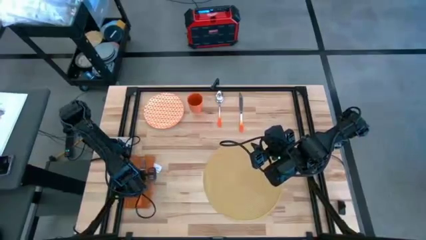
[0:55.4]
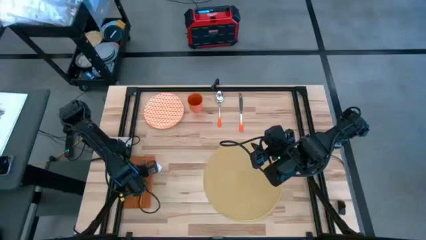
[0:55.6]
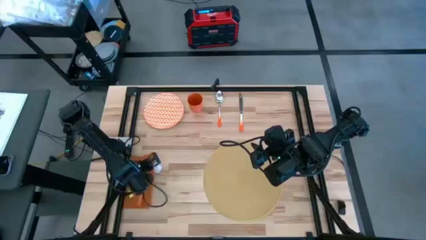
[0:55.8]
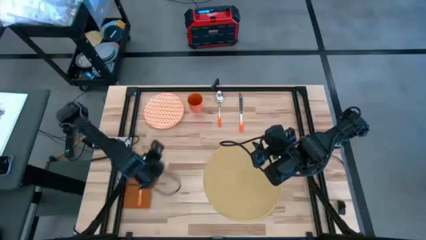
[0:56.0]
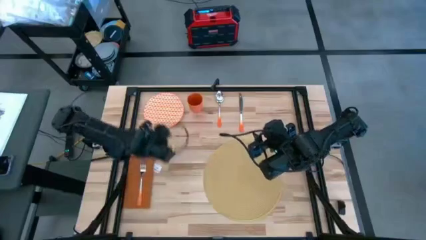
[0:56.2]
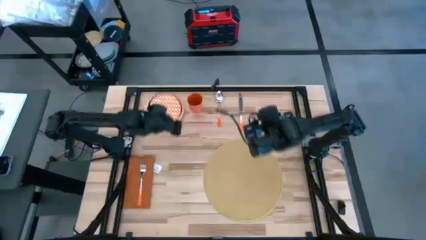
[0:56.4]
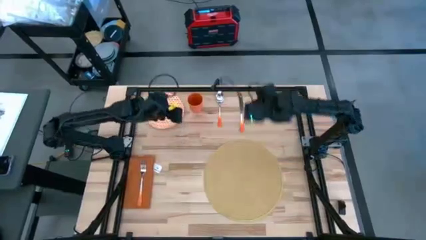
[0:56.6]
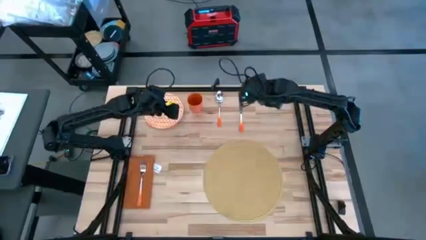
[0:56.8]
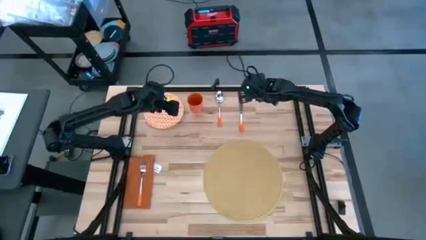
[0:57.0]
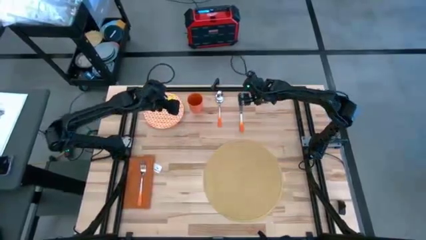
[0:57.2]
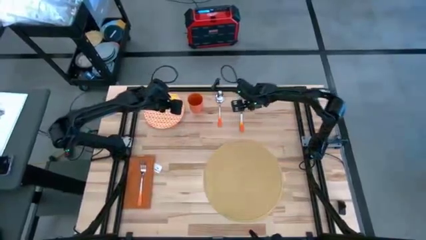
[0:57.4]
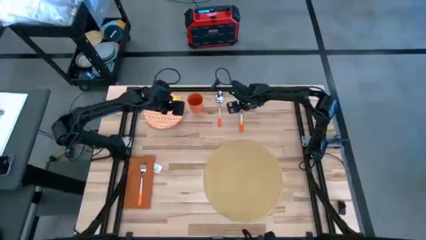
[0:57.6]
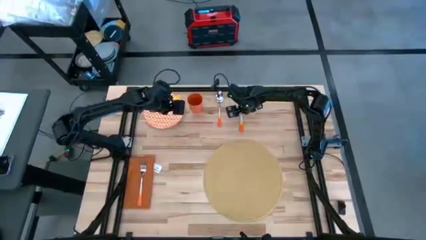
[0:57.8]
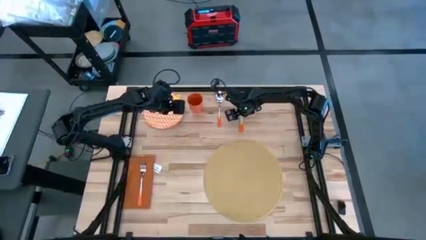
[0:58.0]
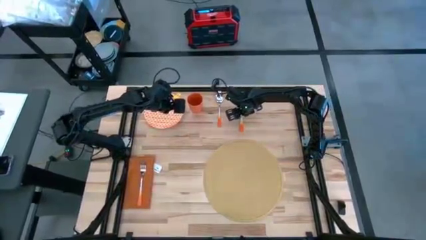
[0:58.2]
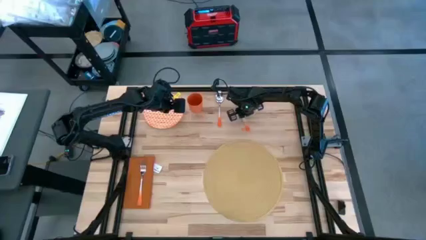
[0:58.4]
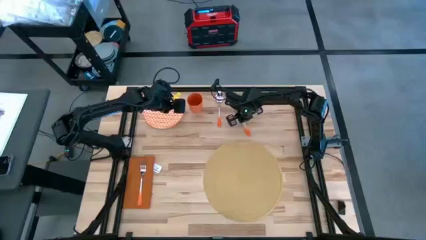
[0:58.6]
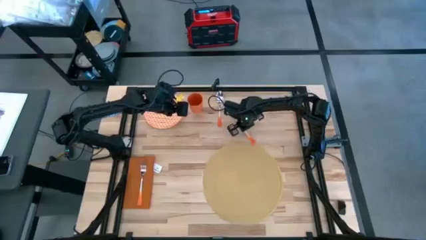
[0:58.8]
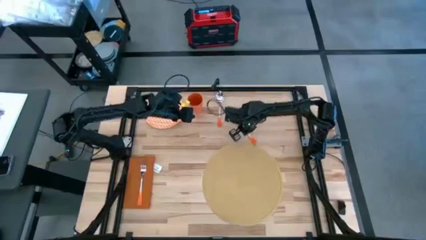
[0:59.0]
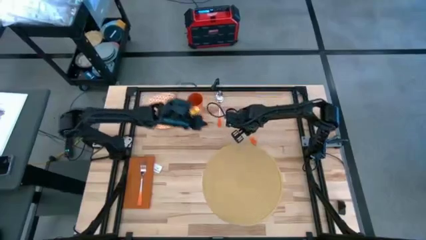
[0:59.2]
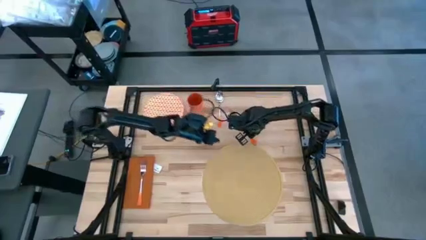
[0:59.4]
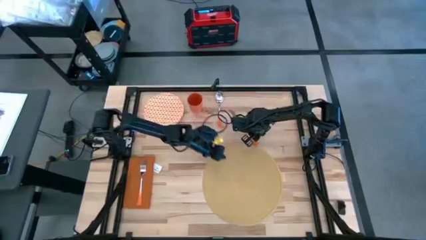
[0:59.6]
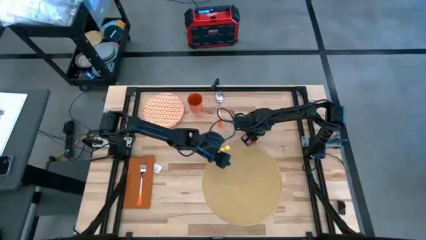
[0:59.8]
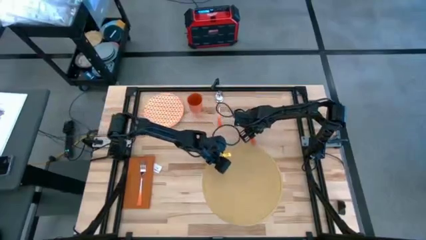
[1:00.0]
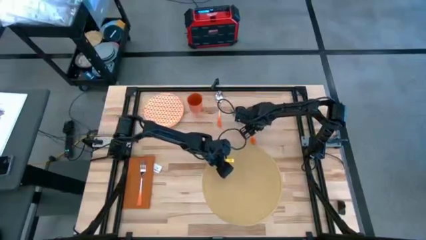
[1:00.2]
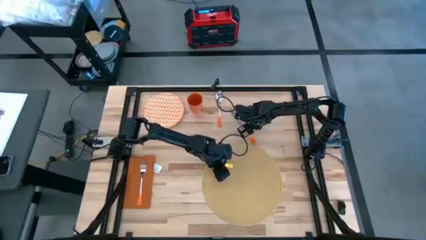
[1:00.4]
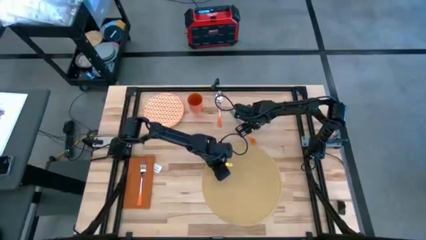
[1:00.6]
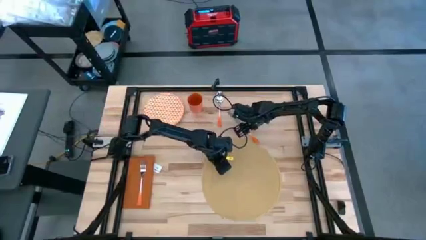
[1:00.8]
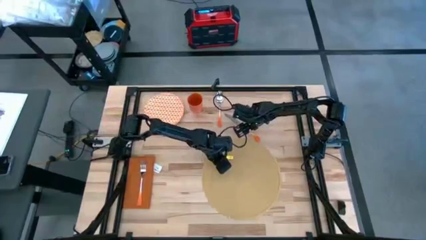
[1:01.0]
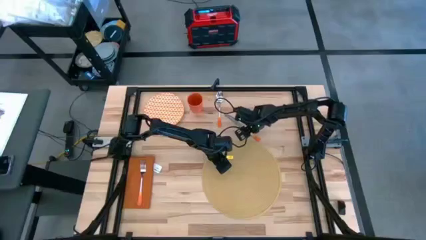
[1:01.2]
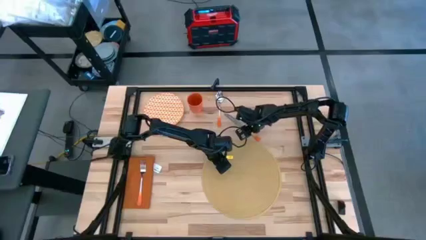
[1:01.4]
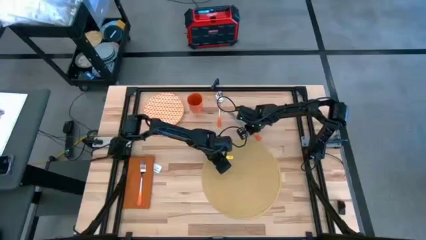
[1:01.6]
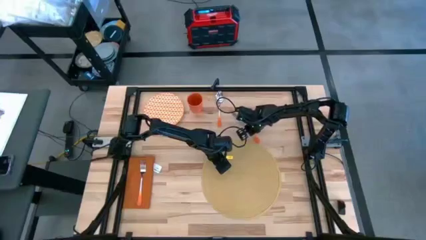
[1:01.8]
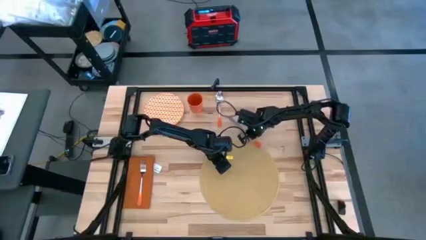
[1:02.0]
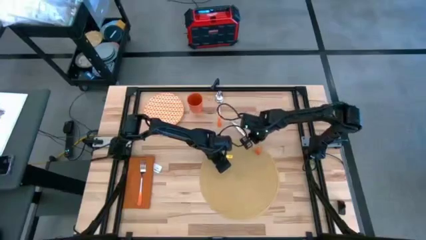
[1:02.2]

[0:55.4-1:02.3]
Task: Set table place
Put the orange table knife to the brown placemat

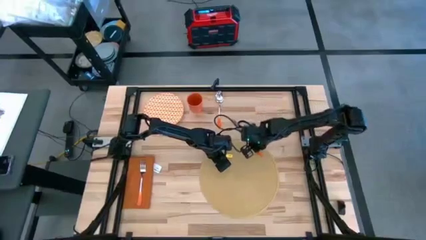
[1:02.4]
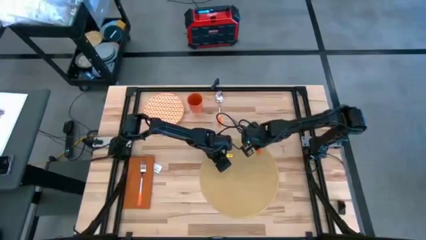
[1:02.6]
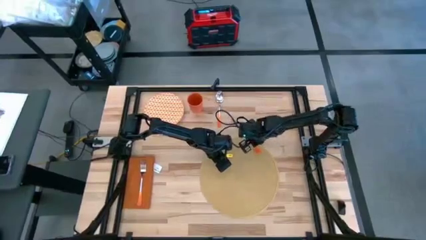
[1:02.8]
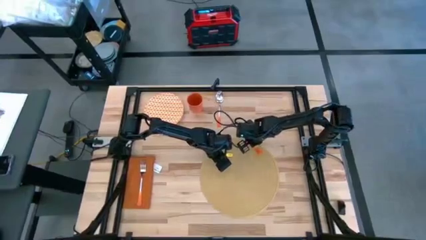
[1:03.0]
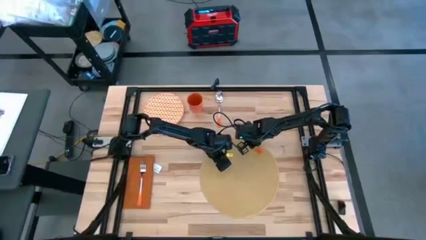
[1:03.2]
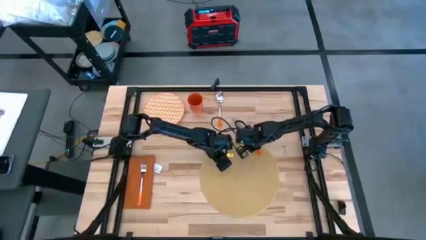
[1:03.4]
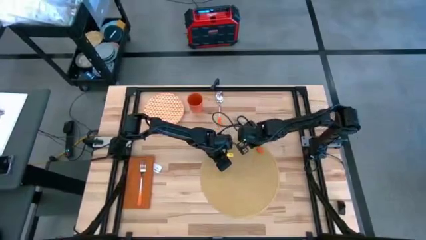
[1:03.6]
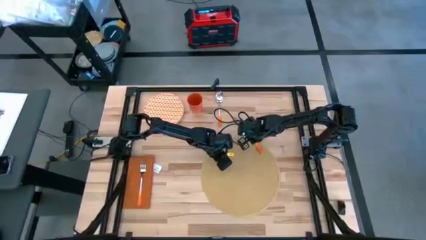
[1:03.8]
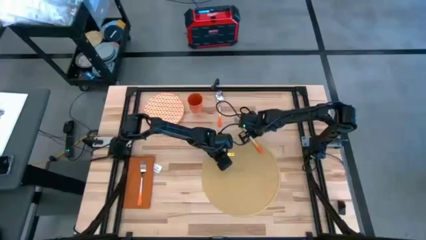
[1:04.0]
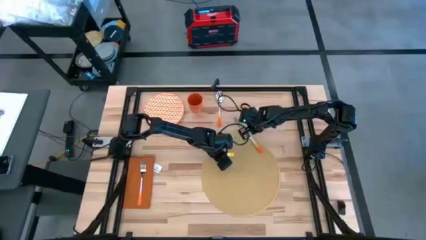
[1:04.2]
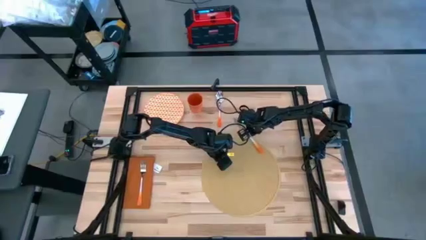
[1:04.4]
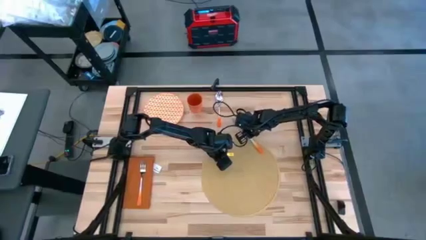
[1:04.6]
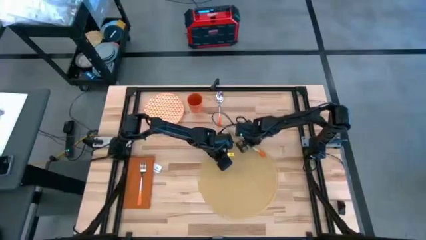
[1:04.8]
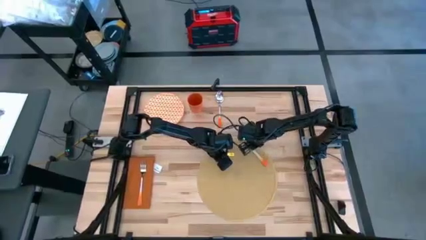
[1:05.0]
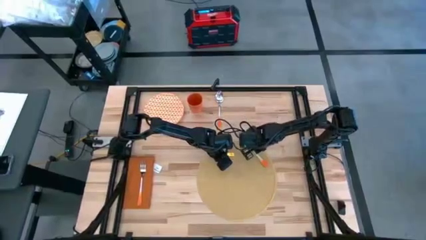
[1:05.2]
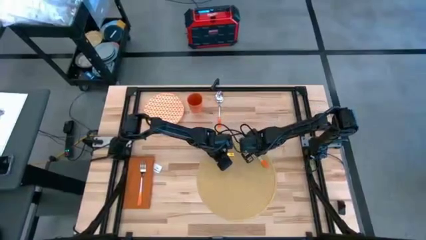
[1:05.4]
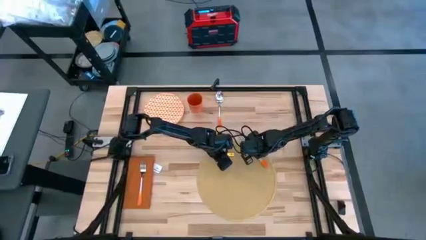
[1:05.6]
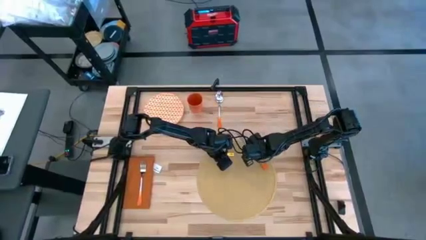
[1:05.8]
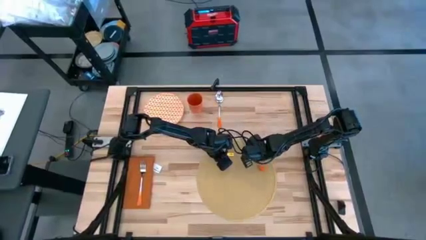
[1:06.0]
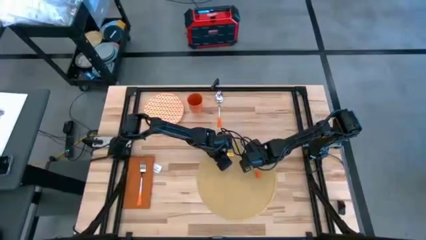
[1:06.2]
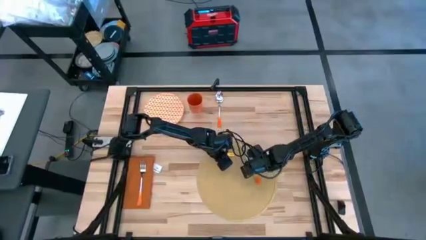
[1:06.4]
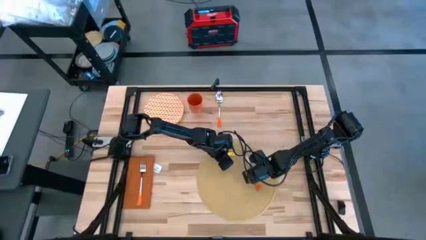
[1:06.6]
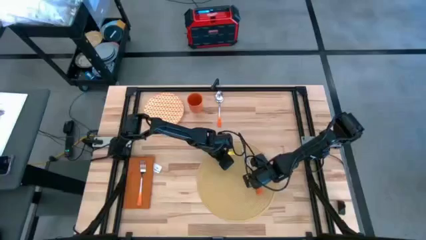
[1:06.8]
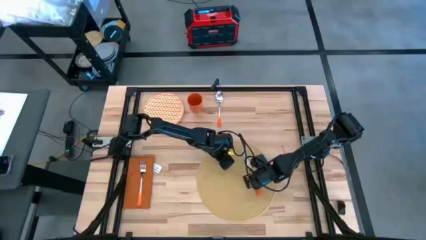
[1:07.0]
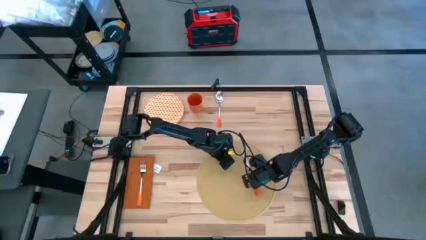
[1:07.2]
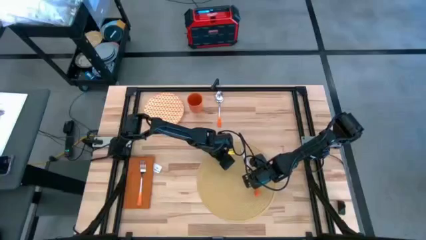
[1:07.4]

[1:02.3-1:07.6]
Put the orange table knife to the brown placemat

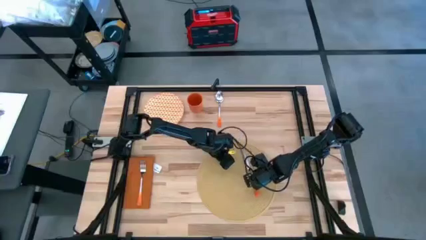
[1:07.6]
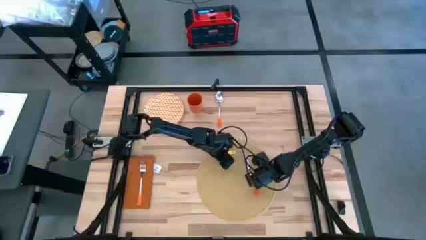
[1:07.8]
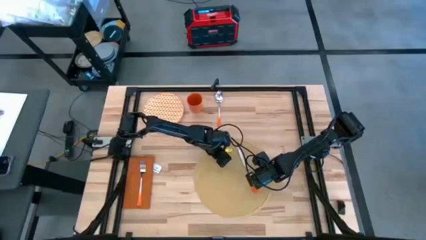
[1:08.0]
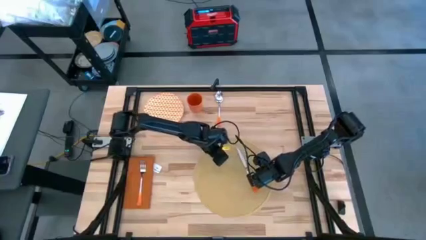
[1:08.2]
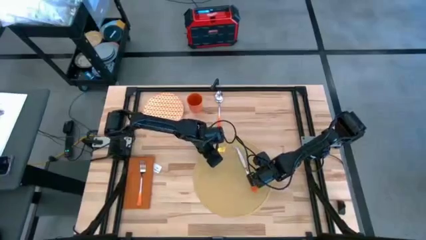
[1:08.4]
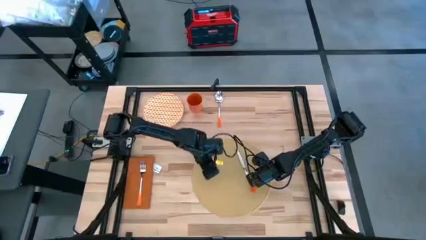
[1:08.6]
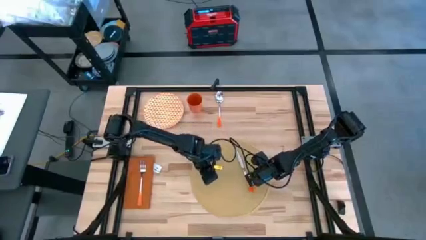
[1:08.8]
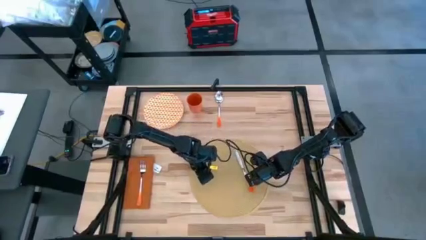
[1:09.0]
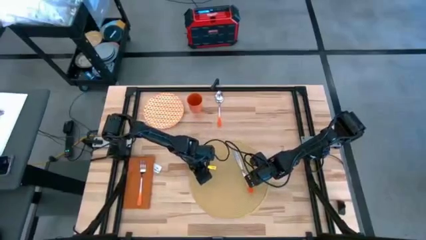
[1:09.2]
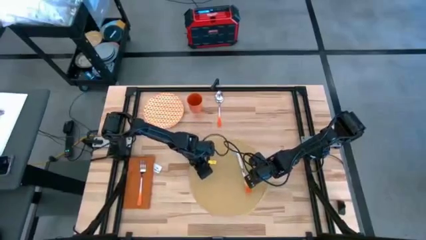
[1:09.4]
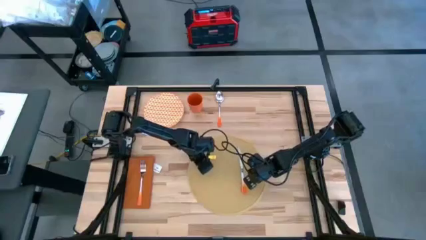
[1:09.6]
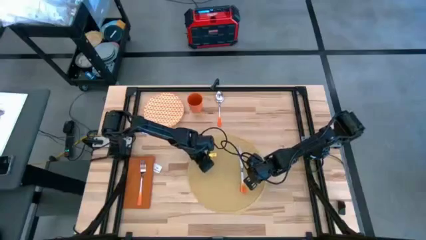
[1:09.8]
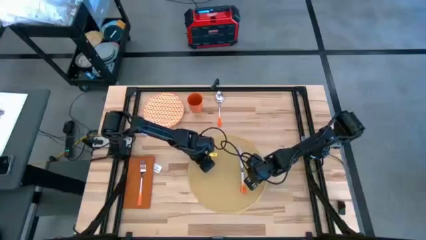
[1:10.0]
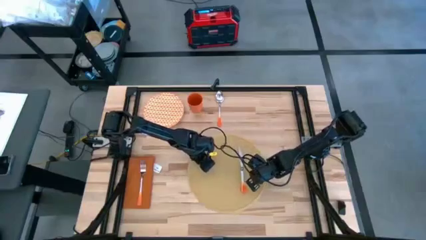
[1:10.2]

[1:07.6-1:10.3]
Adjust the the brown placemat
